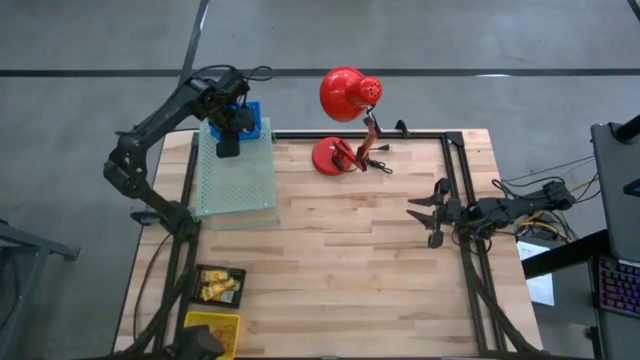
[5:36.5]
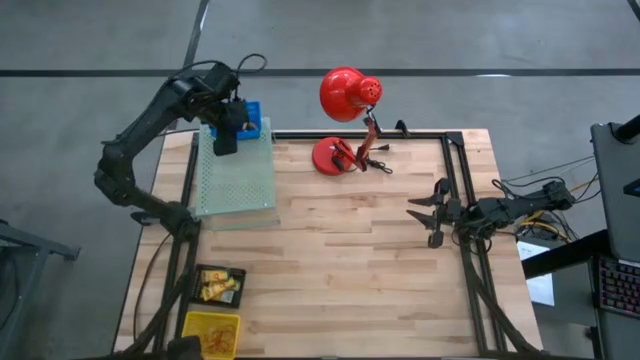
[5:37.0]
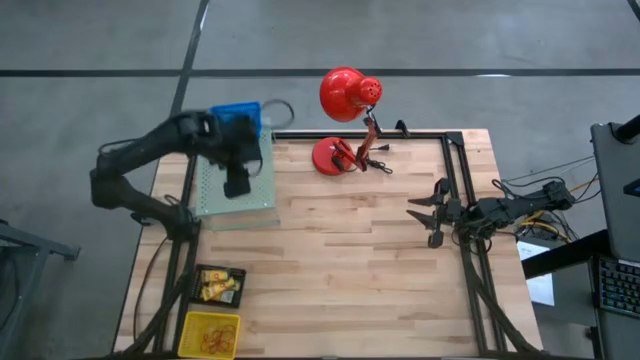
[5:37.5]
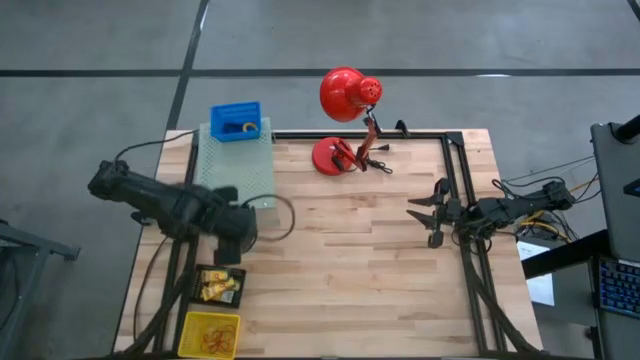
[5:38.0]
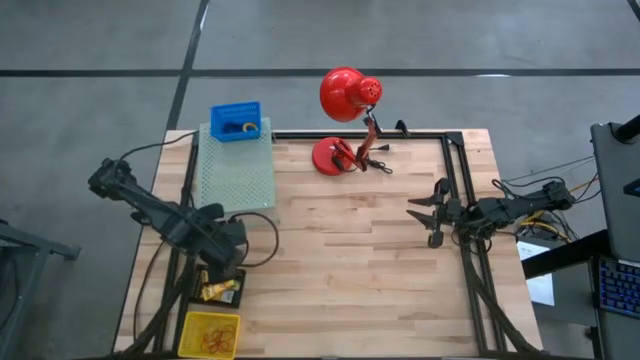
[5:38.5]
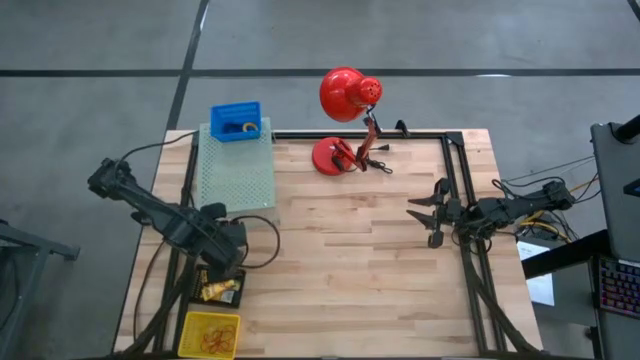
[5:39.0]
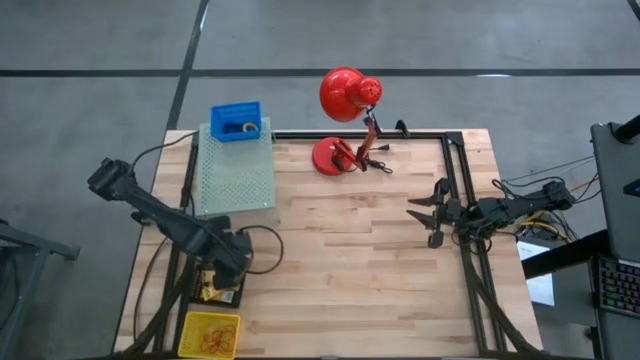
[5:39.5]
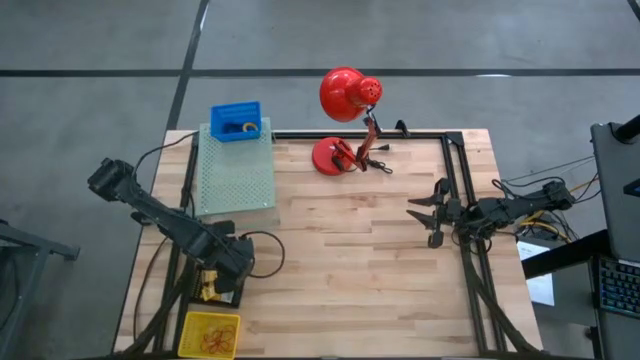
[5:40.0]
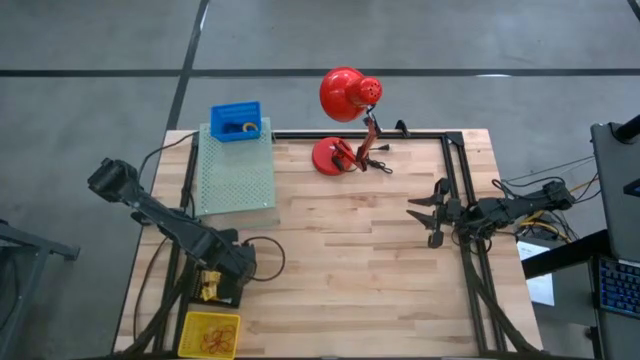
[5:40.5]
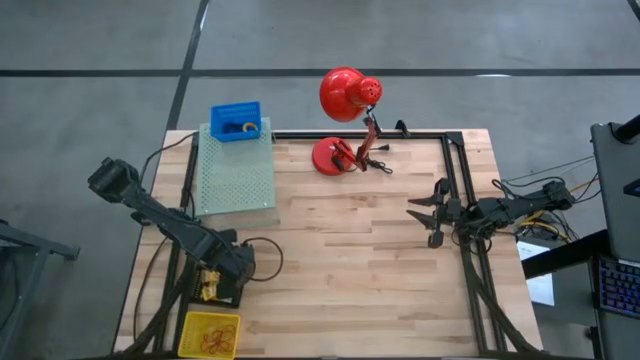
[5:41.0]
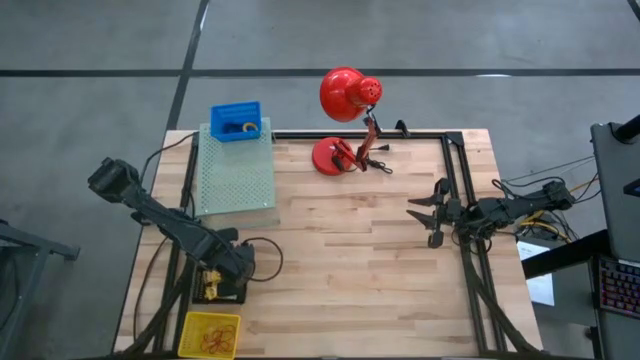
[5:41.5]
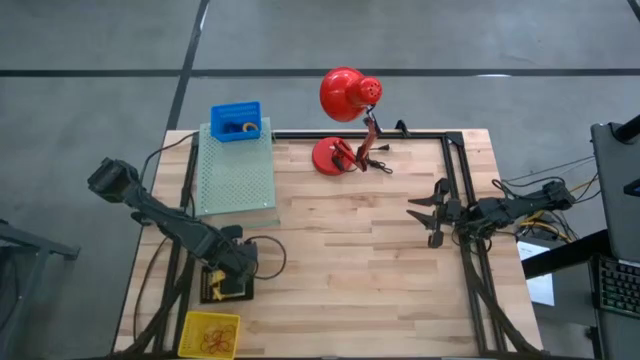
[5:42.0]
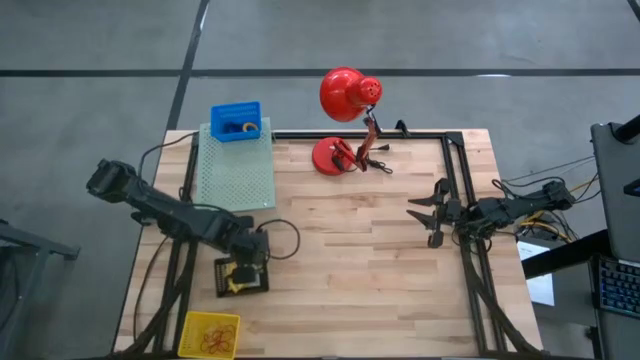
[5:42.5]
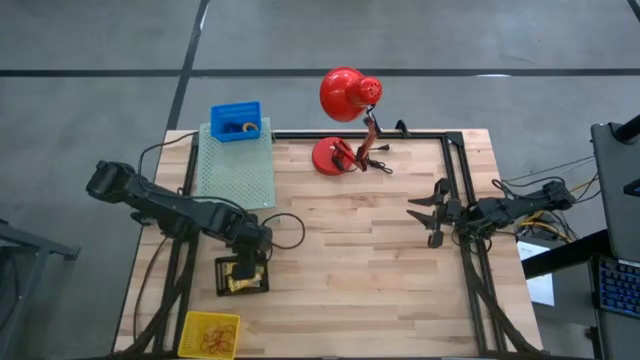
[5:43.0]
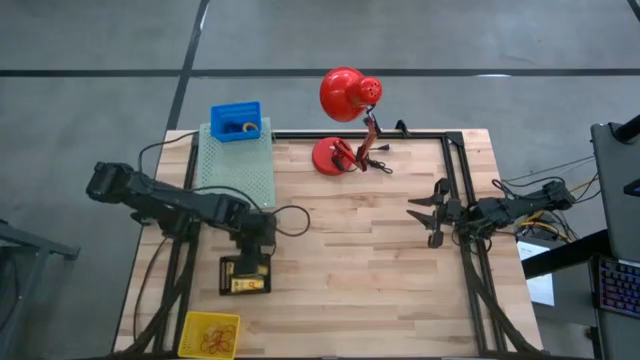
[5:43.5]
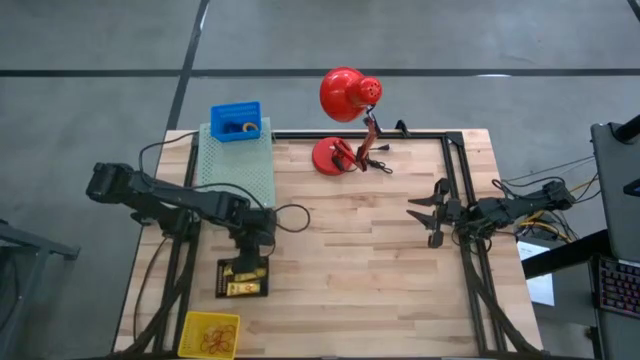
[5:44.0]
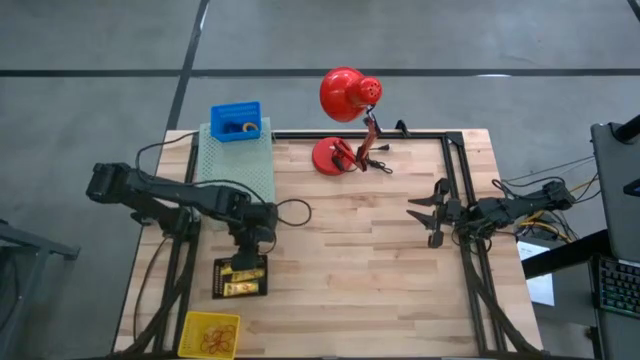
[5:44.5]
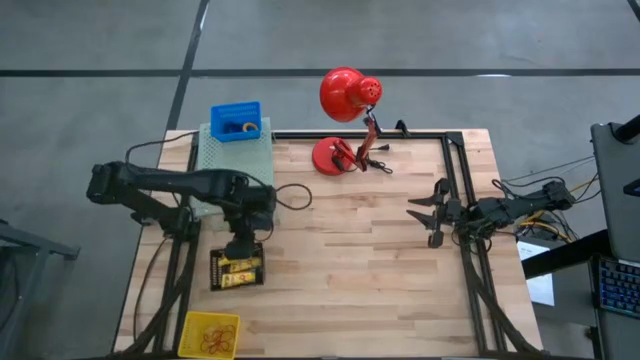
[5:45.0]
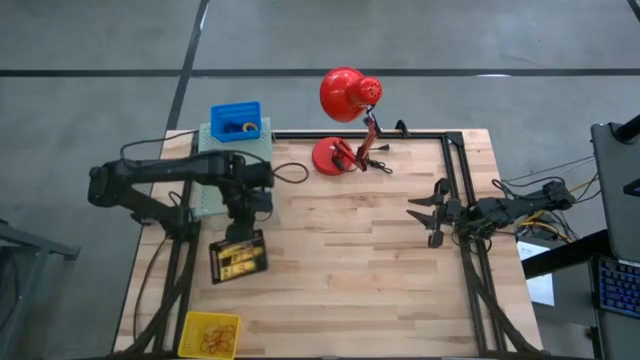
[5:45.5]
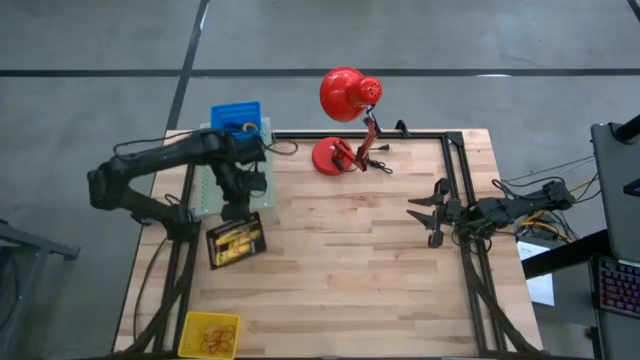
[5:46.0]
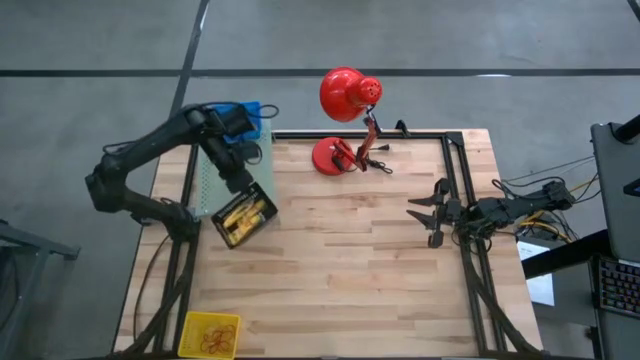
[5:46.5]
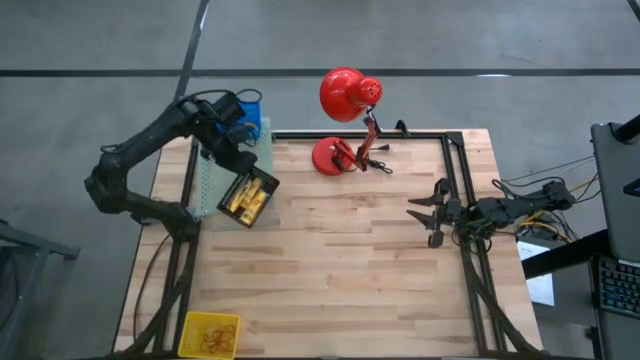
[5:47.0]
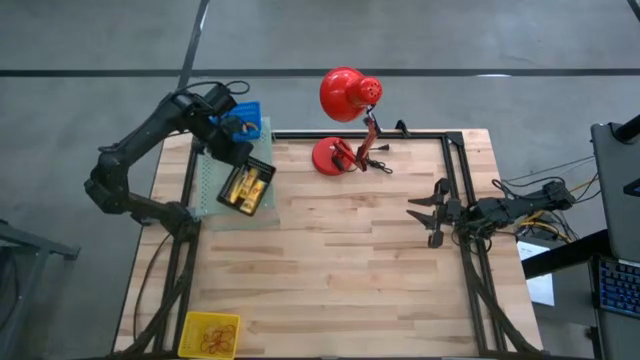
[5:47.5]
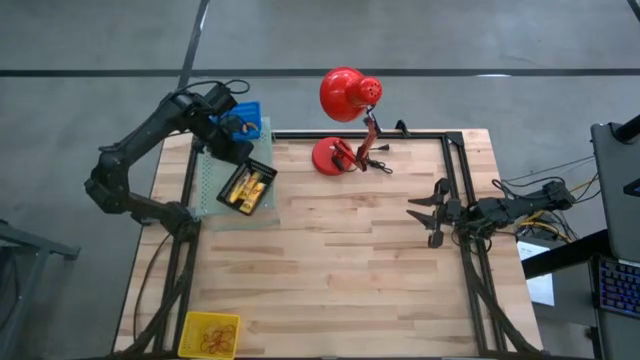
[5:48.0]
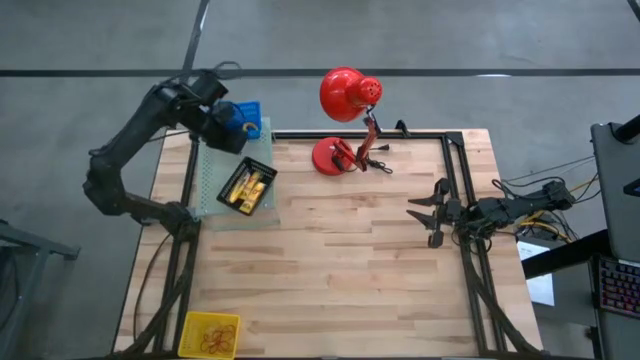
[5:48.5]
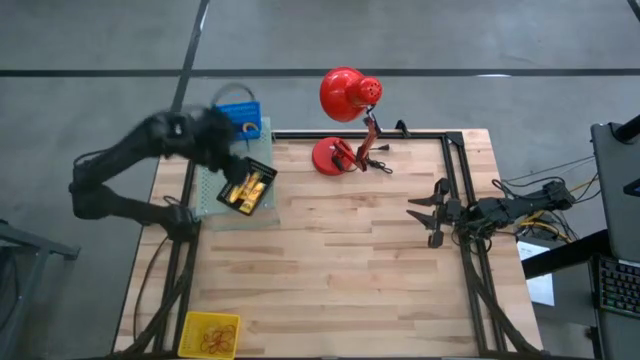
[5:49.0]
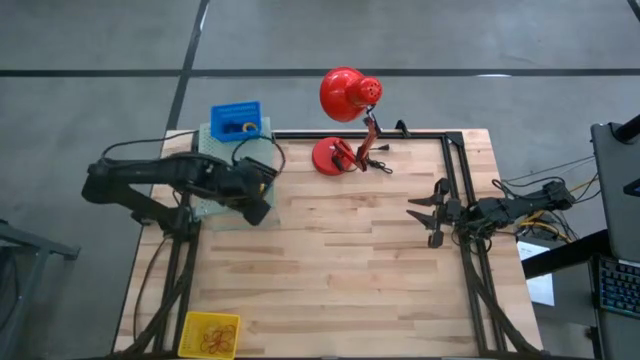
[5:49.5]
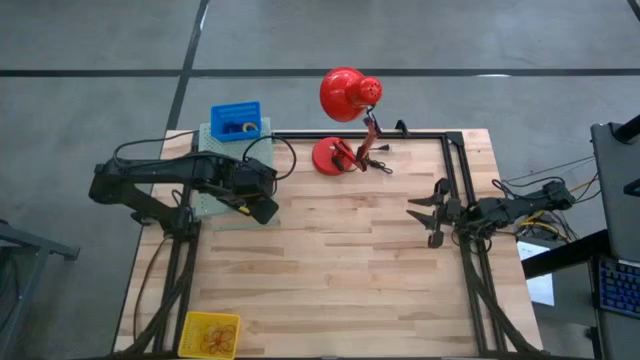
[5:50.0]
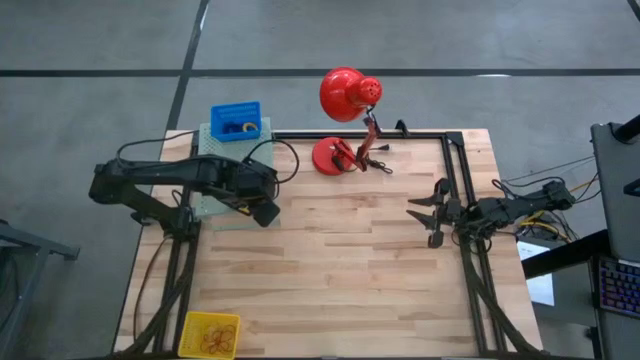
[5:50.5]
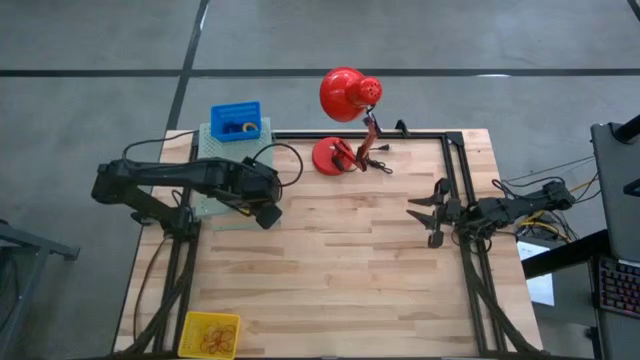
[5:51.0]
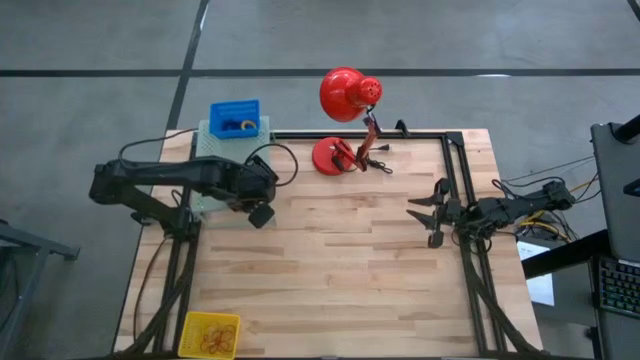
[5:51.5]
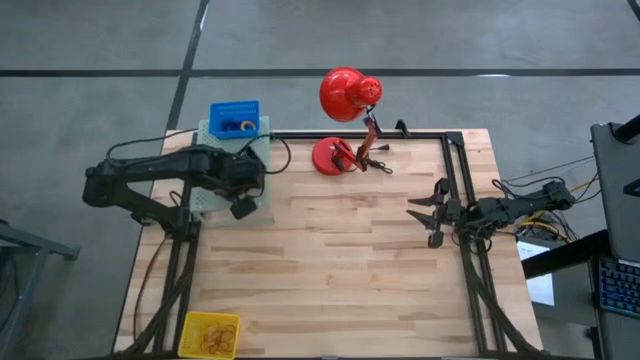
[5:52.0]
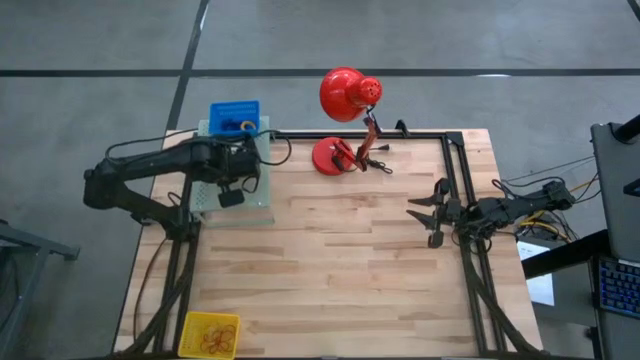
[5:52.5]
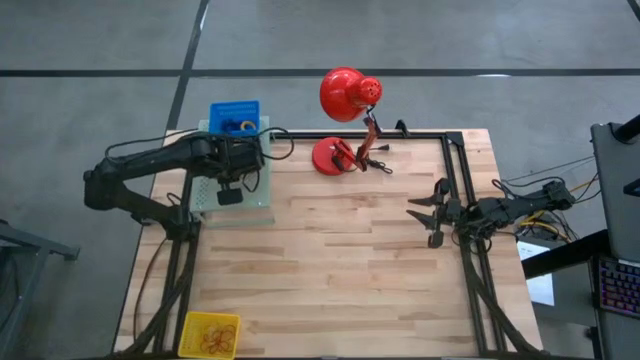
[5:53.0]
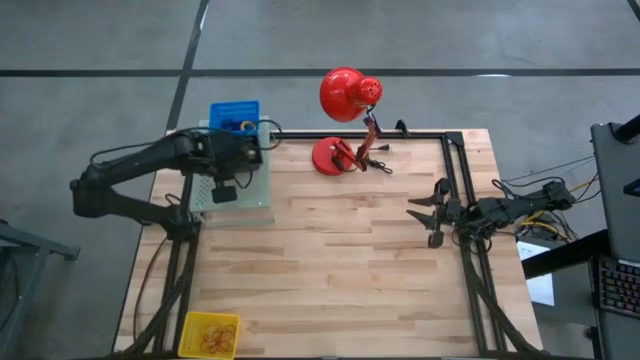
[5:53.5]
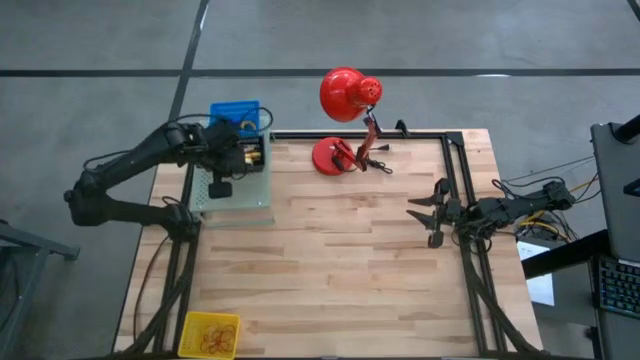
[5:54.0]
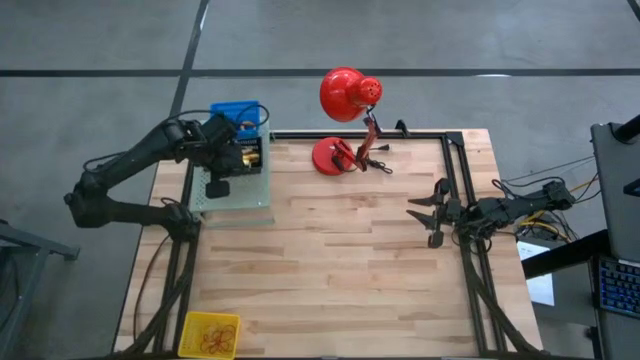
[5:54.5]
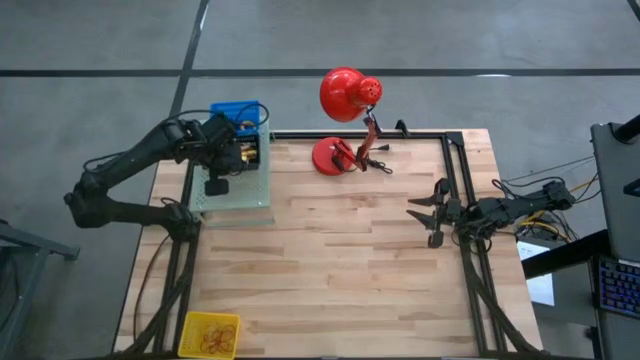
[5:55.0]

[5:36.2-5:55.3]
Task: Pick & Place Office Desk Supplies
Put the black bin on the shelf

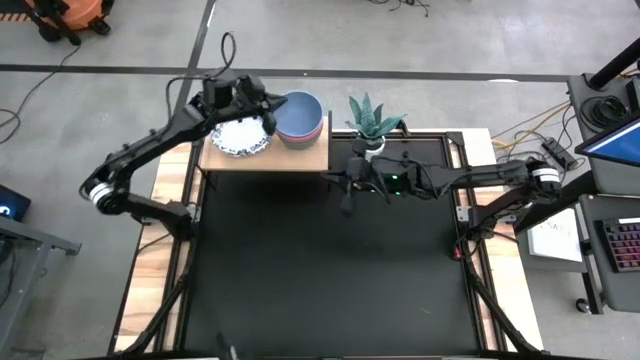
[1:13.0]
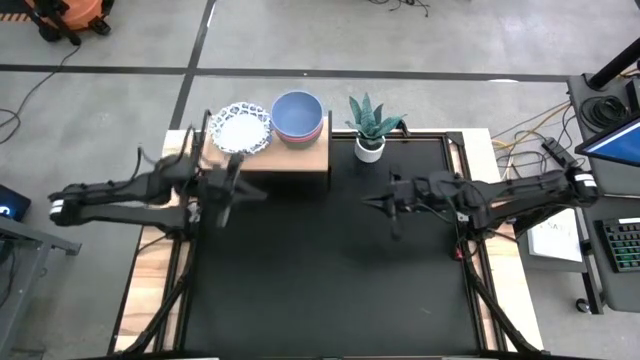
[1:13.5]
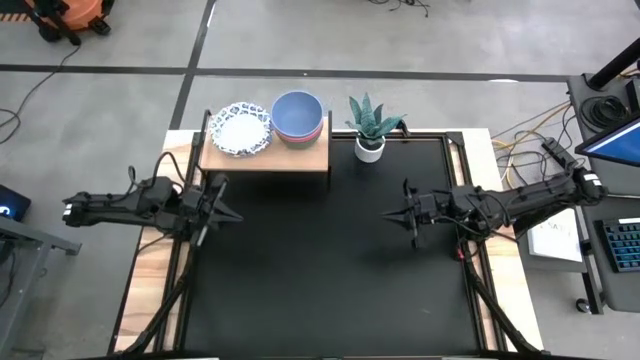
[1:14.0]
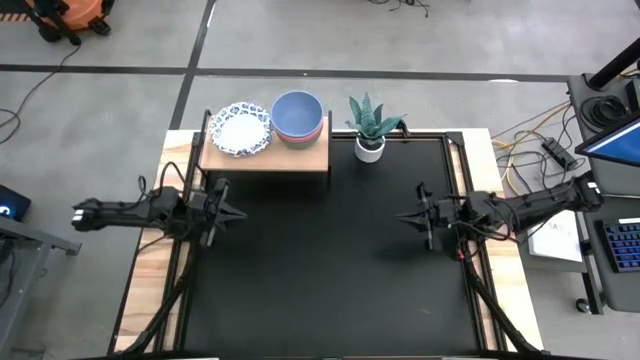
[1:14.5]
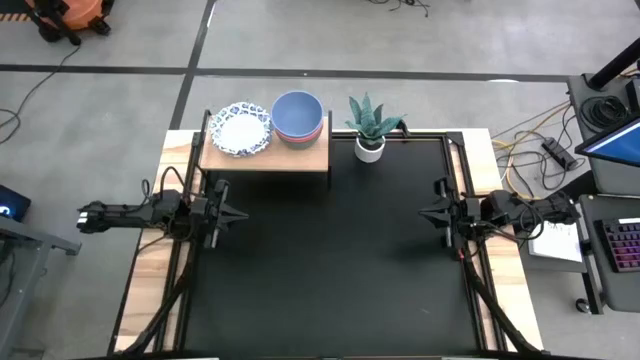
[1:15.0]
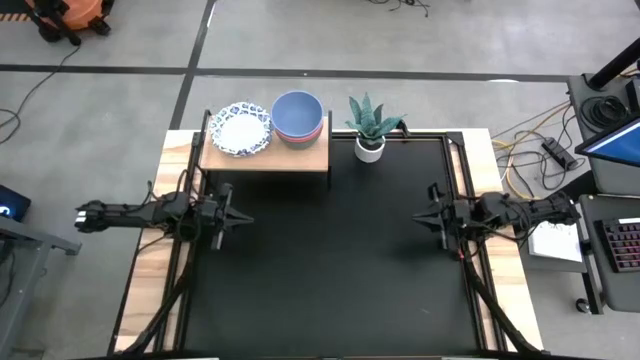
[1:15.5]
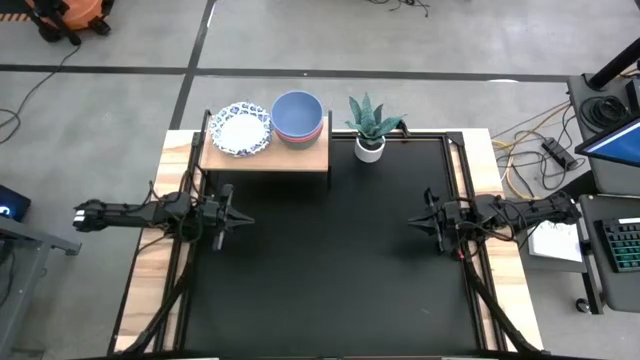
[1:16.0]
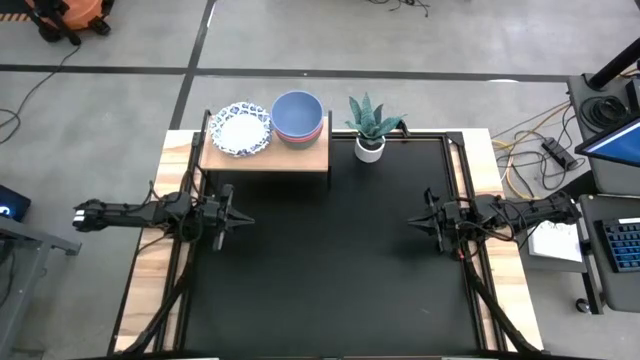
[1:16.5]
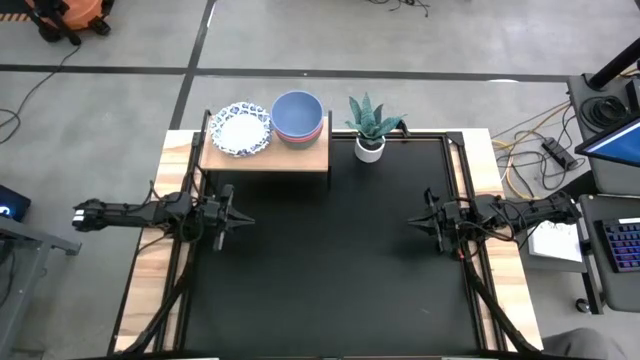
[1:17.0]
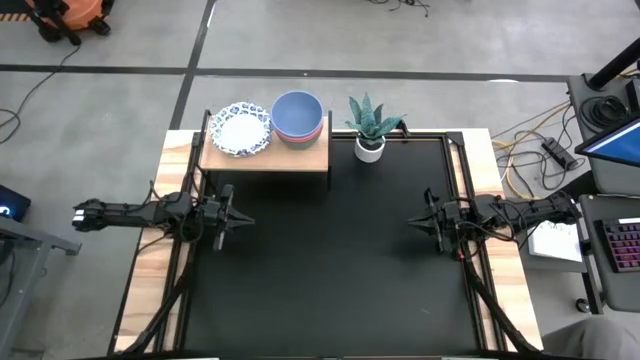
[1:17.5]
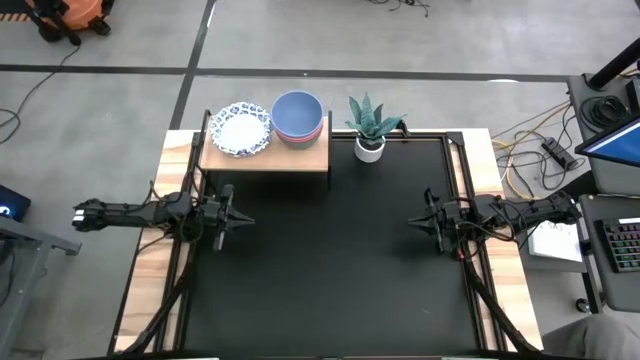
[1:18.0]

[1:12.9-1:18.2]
Task: Place and stack bowls onto a shelf
Return to Home Position
